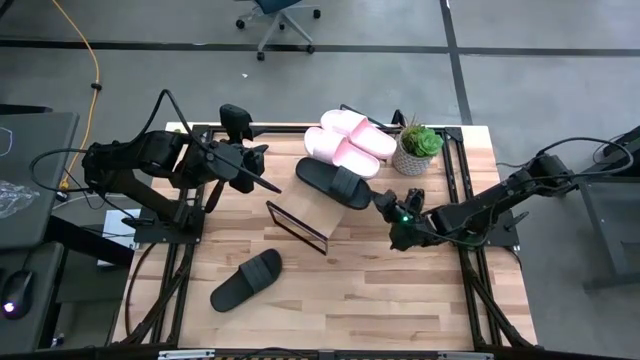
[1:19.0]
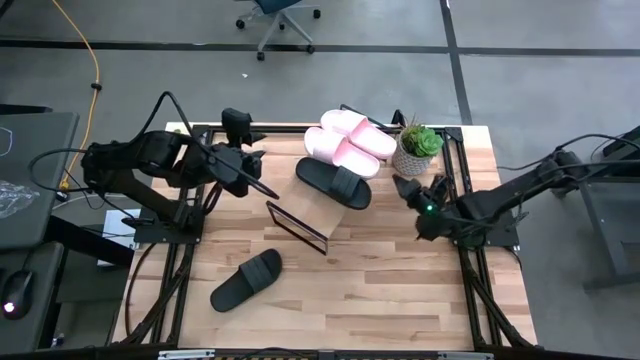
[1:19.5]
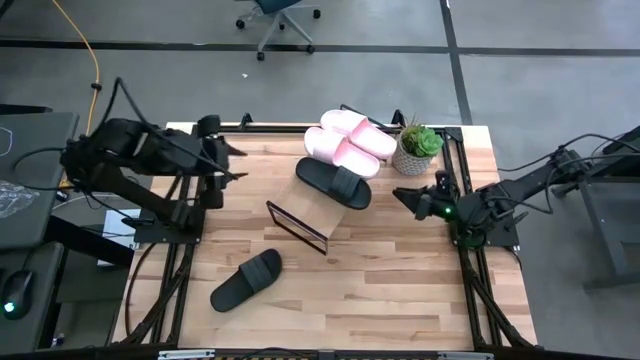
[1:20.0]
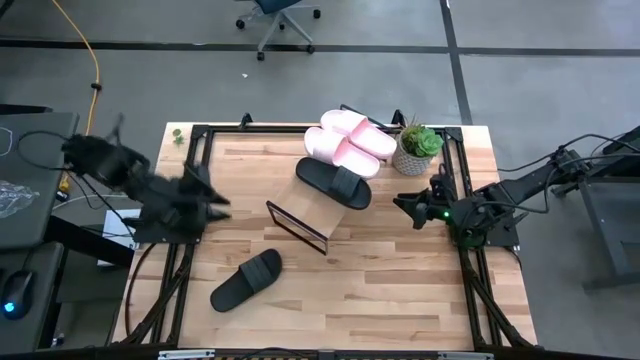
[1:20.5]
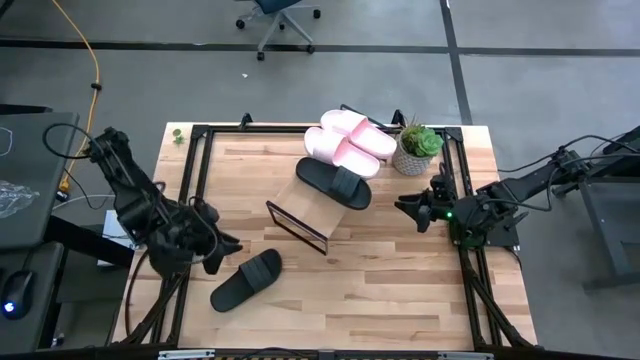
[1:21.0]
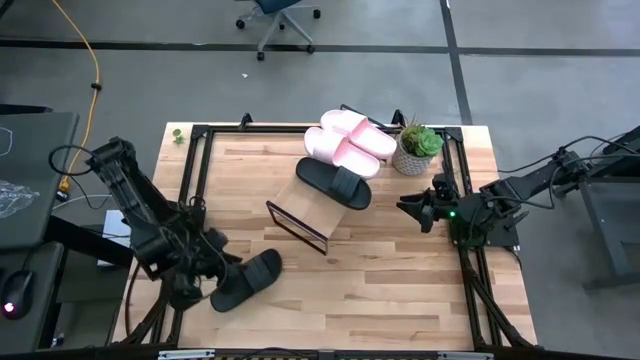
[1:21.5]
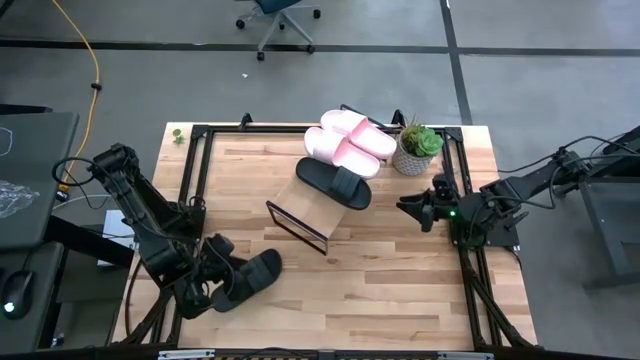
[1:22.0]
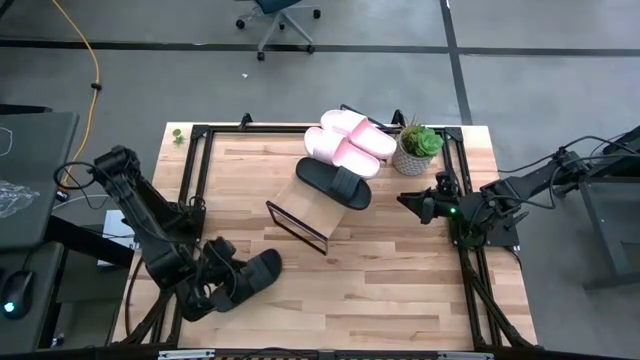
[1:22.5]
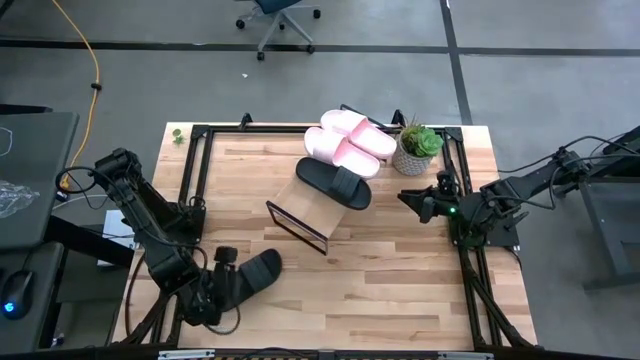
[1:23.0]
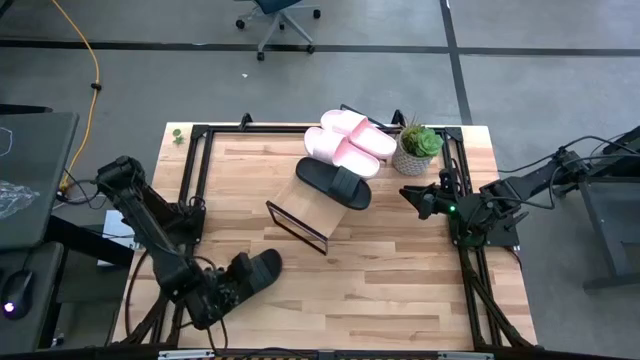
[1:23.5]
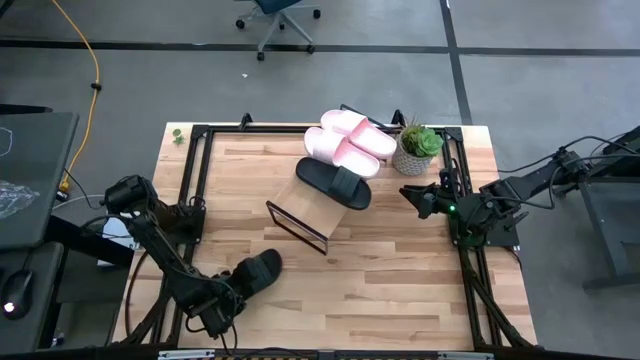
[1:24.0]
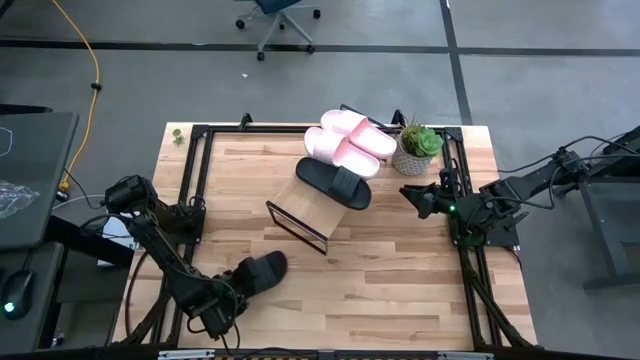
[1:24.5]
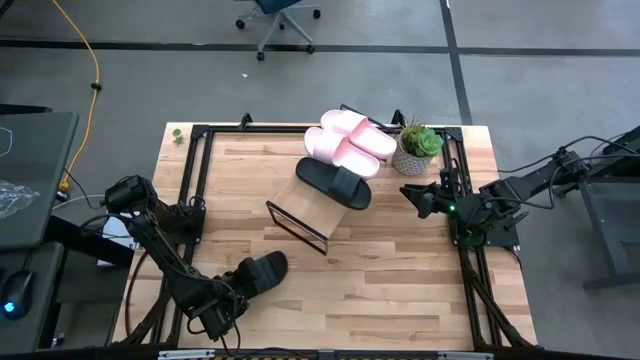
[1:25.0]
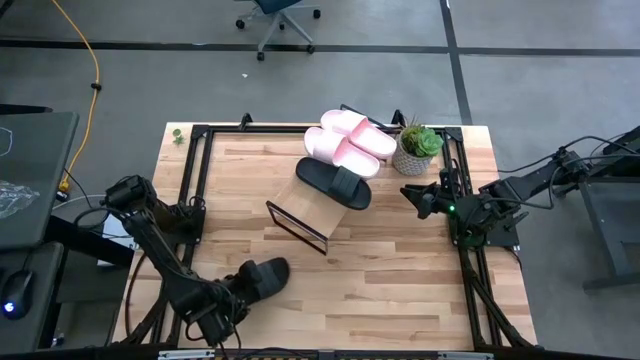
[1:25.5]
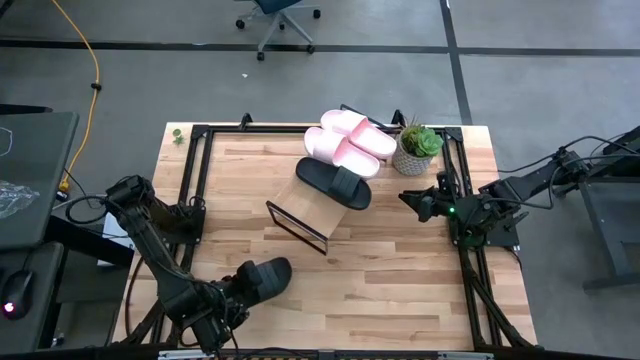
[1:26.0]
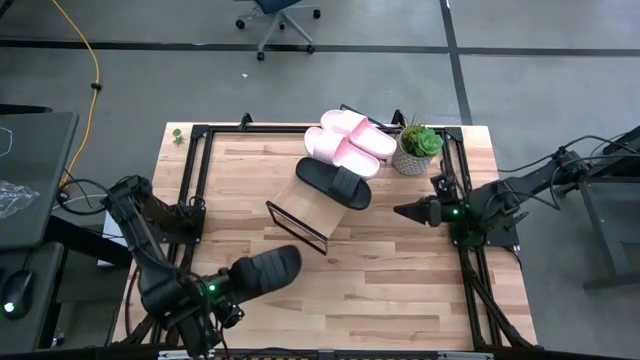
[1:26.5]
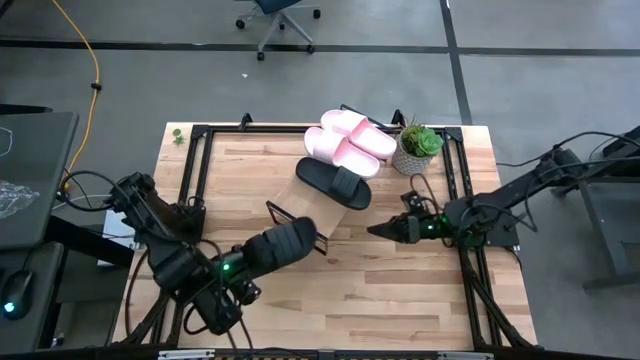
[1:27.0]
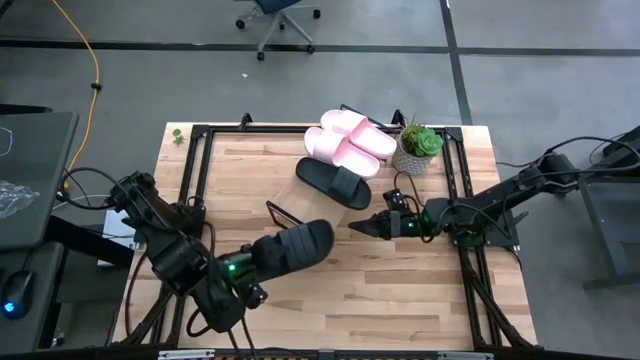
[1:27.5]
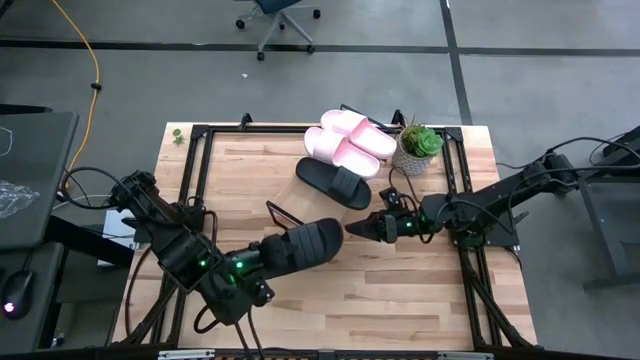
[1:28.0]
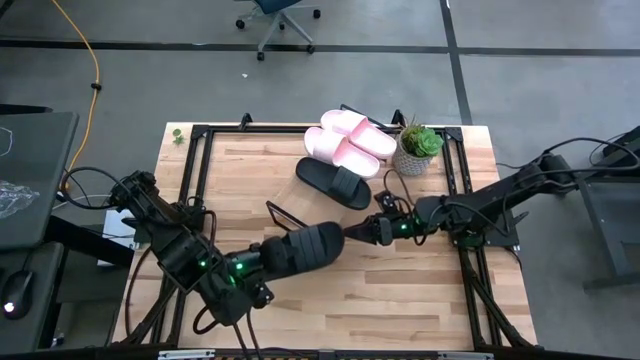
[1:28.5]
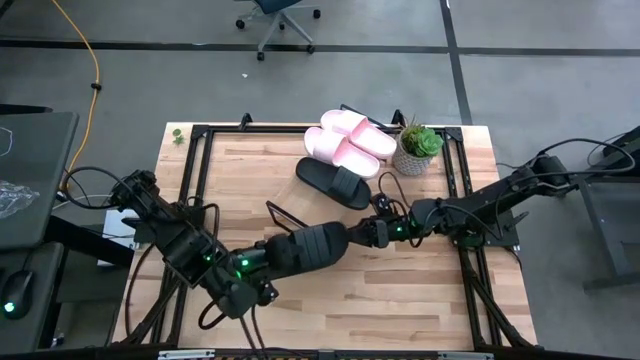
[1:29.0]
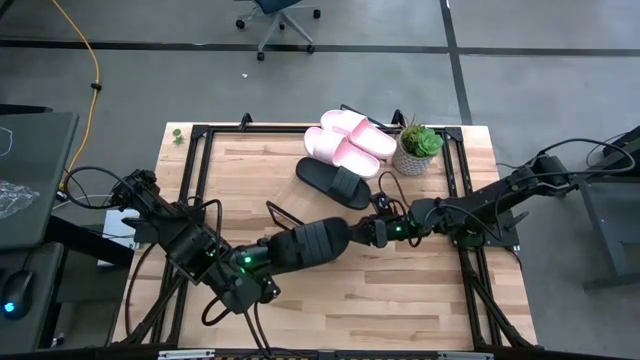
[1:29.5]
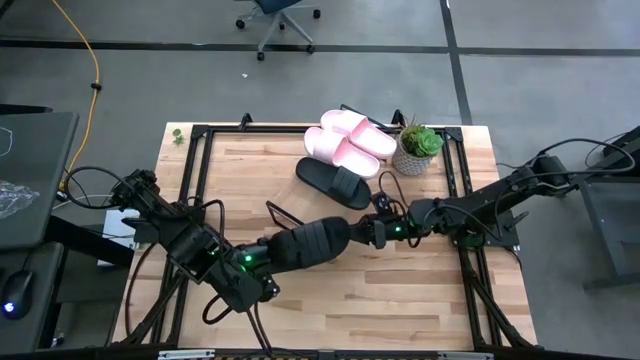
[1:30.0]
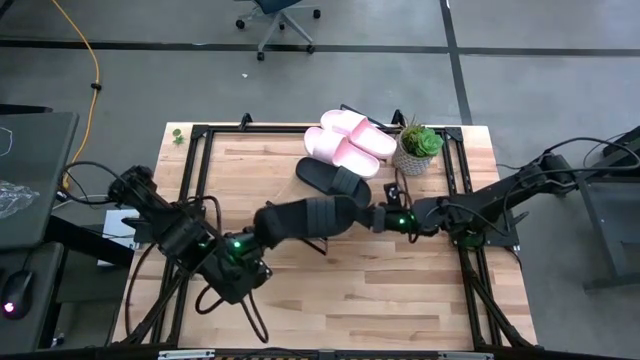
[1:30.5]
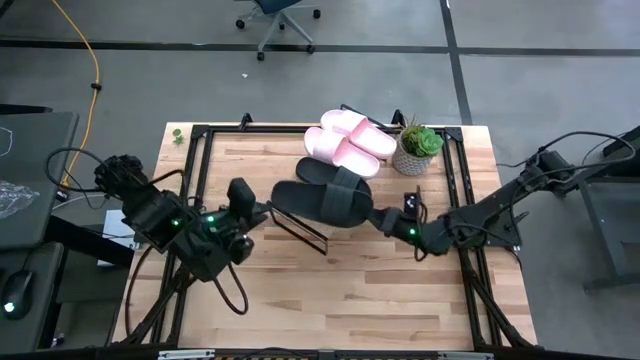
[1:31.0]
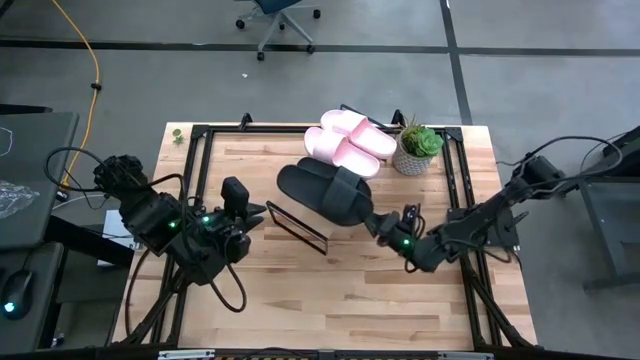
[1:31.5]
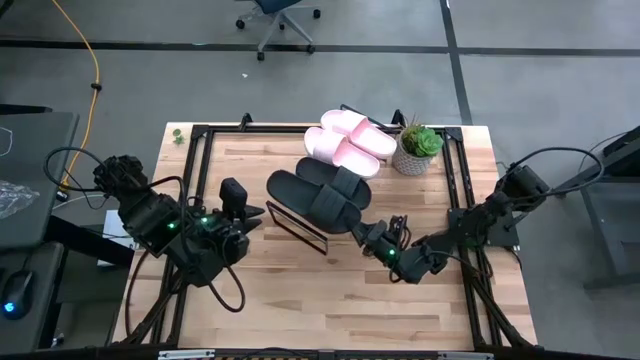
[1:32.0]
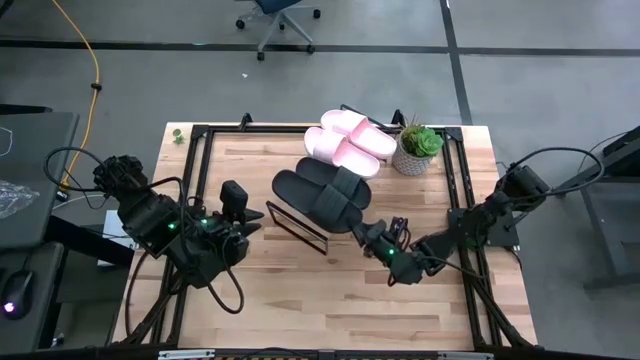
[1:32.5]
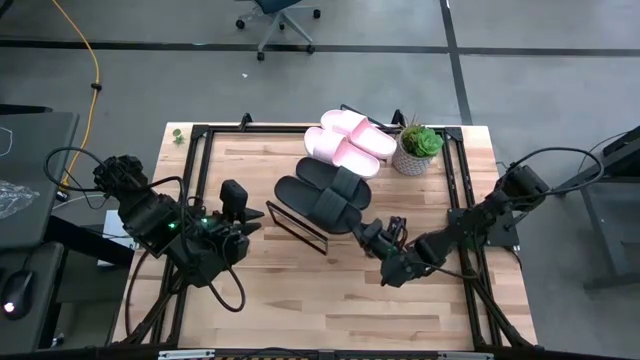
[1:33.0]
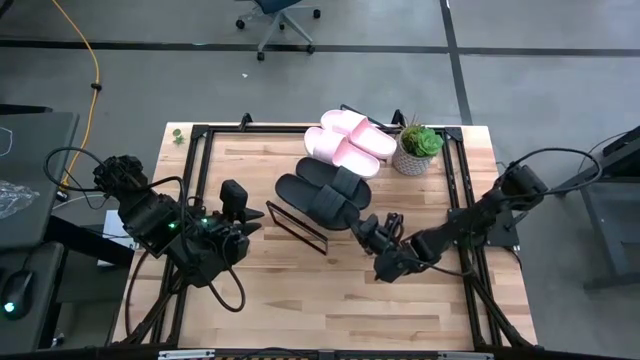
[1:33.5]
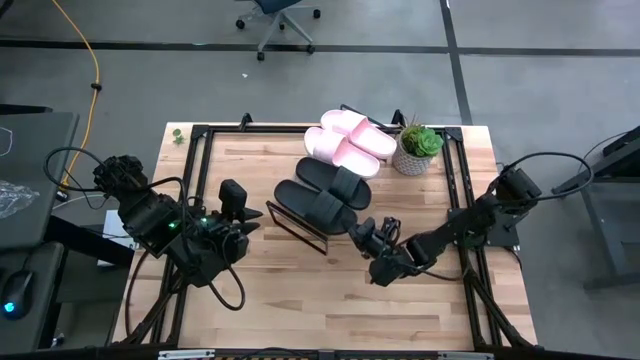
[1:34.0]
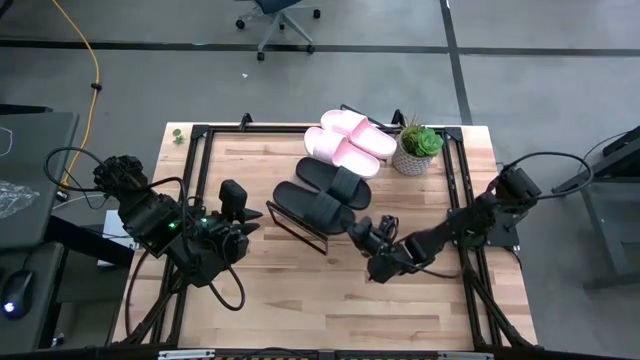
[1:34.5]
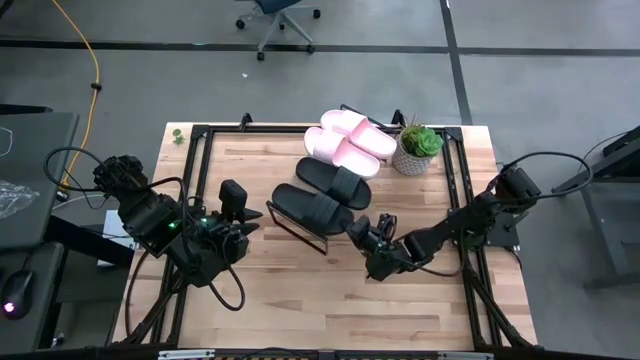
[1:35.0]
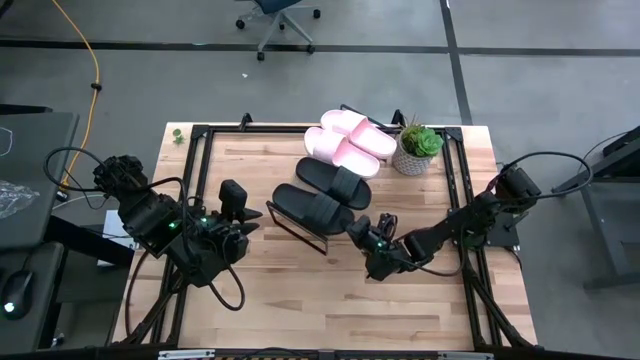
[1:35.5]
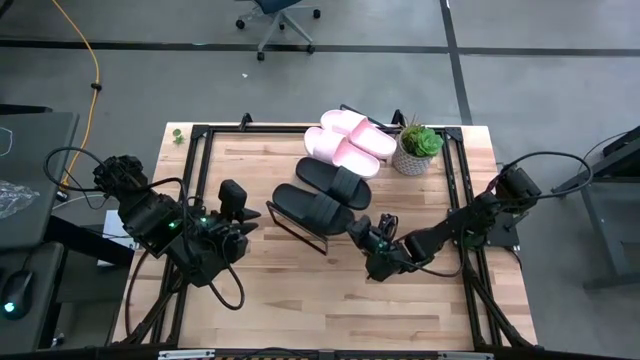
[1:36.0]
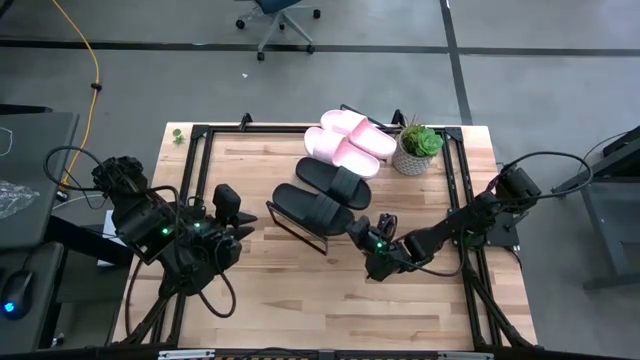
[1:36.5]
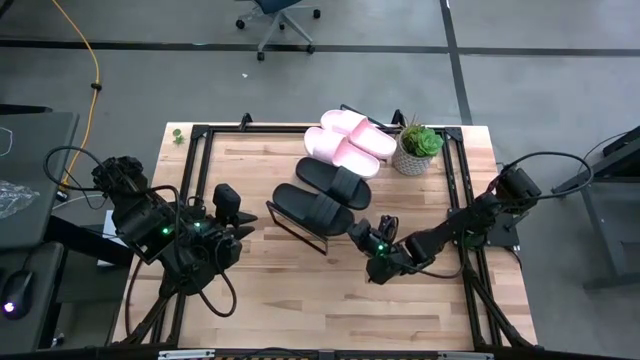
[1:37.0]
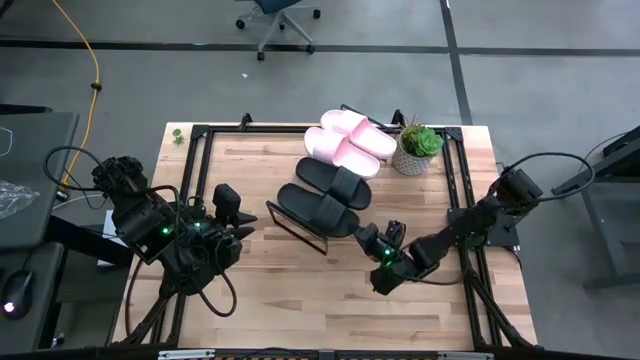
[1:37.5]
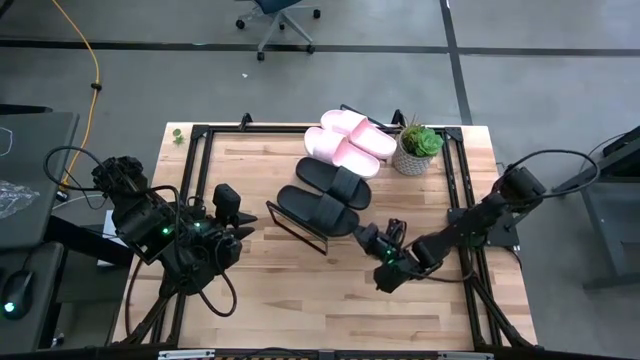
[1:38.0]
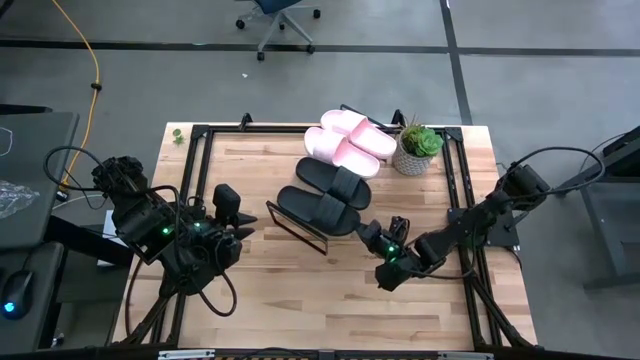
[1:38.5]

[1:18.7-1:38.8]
Task: Pick and place slides into the shelf
Put the black slide on the shelf

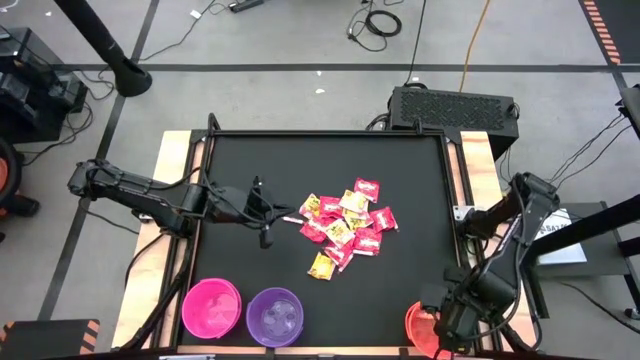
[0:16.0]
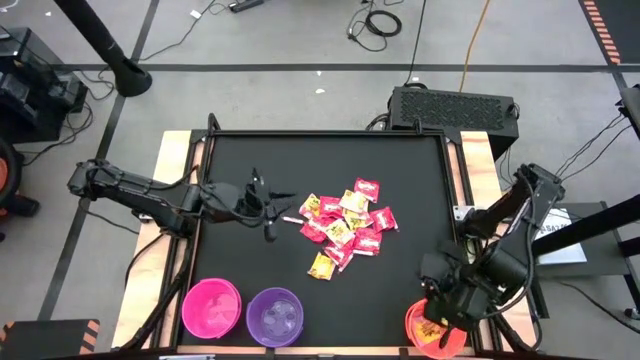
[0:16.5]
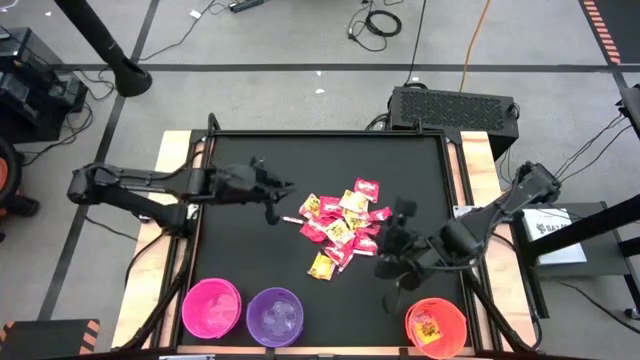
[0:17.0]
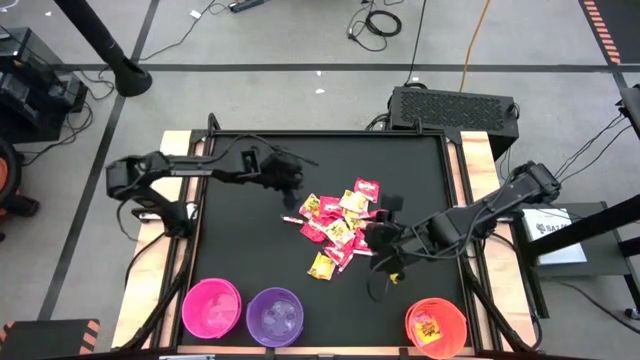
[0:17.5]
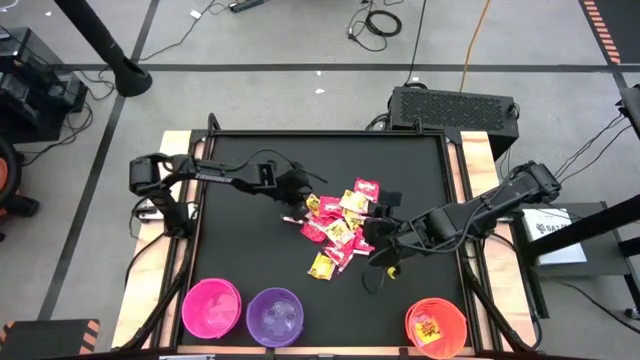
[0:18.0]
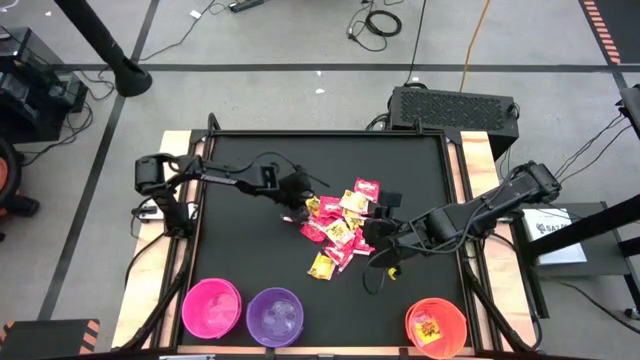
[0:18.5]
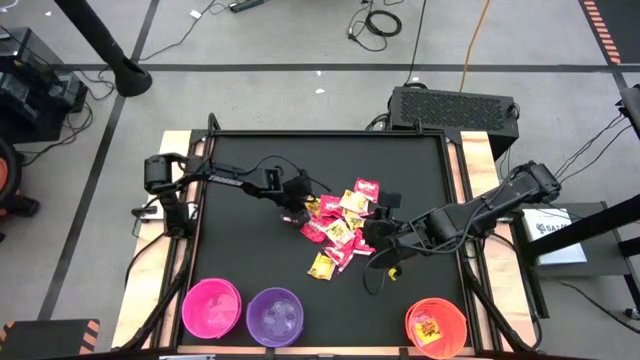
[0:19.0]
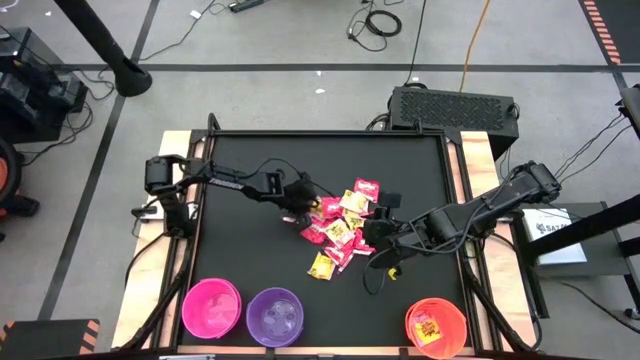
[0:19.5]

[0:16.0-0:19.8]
Task: Sort candy by brand, put in halloween buckets
Put the yellow candy into the orange bucket
